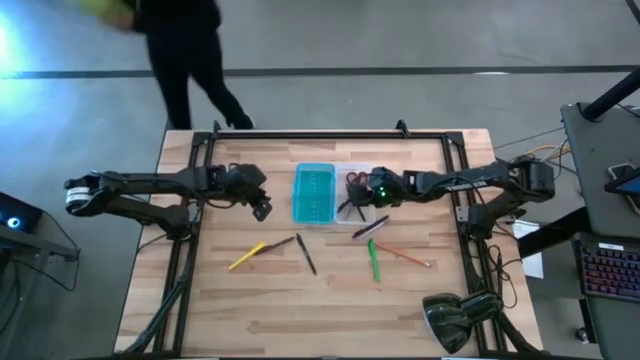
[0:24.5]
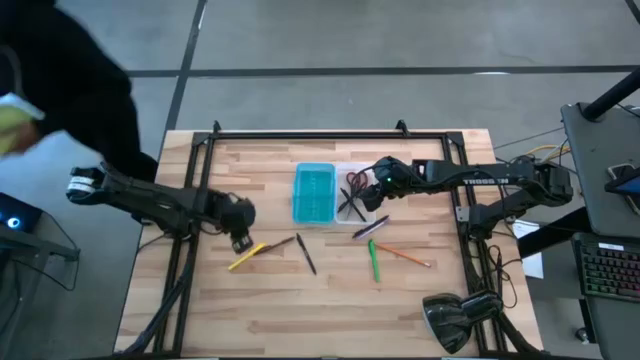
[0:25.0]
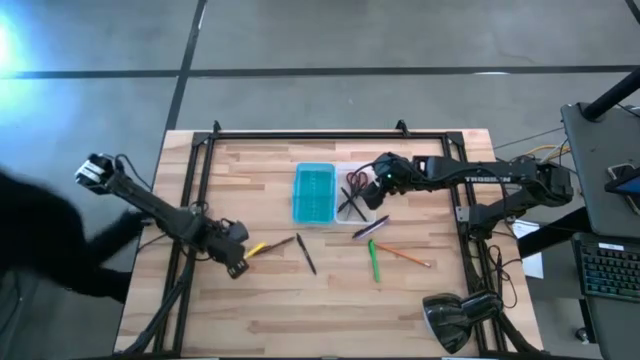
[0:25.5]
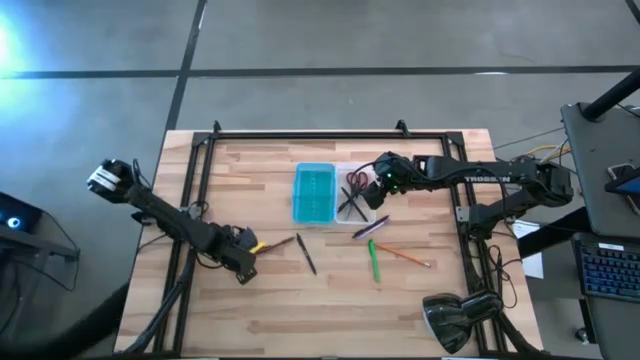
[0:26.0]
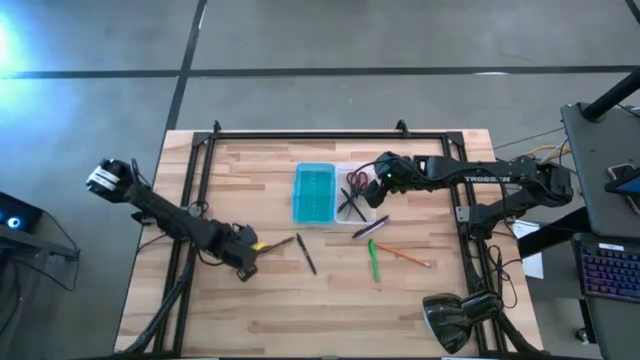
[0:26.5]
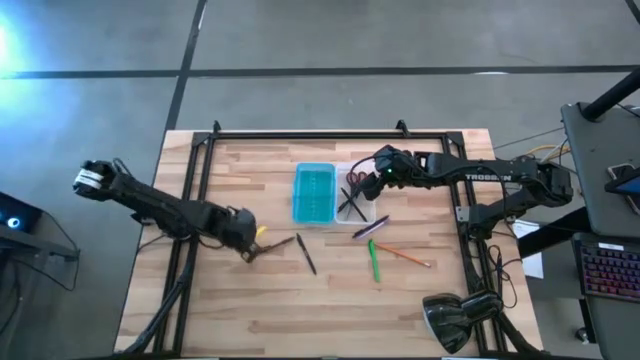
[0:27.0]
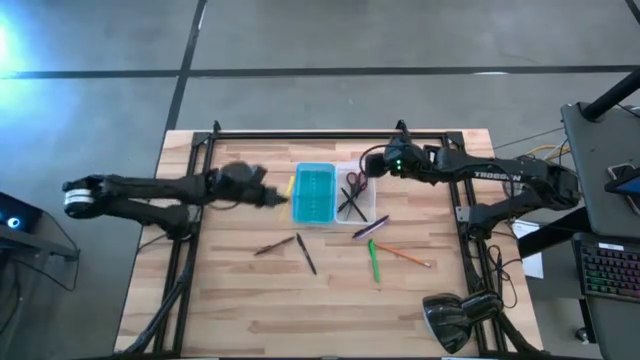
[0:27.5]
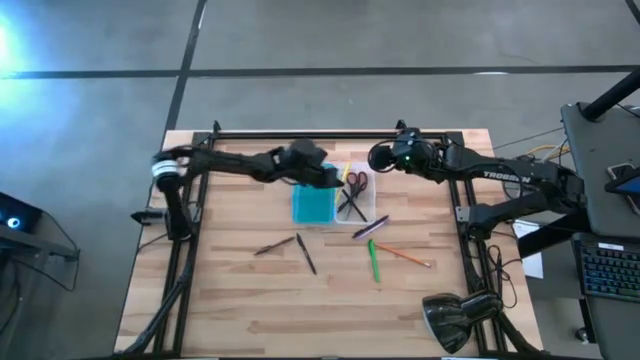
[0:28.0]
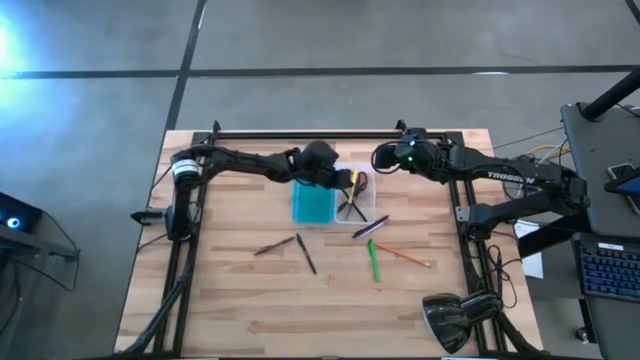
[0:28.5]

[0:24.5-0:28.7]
Task: Pick & place school supplies into a supply box
Put the yellow pen into the supply box

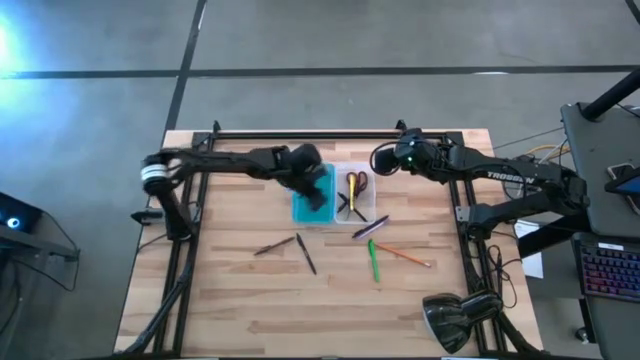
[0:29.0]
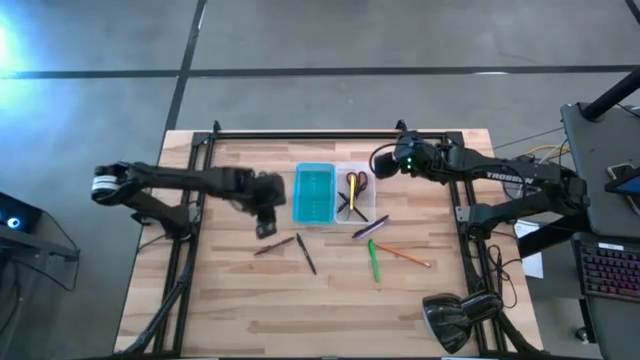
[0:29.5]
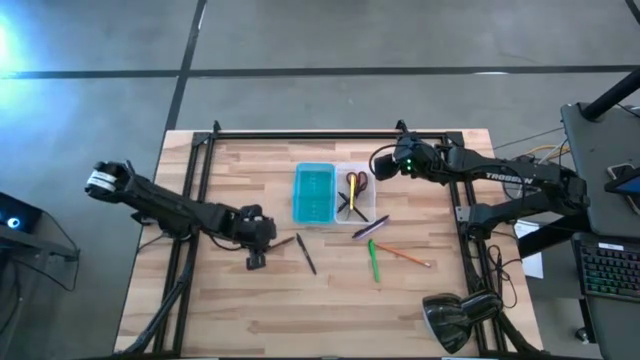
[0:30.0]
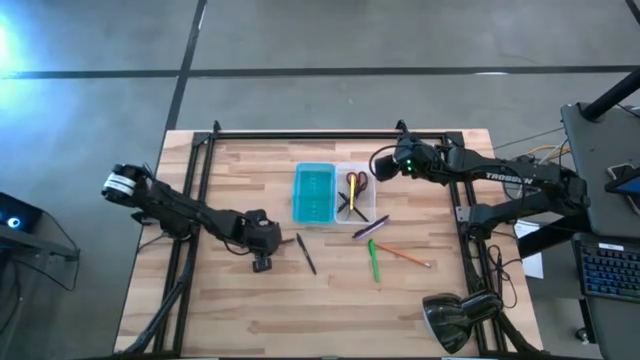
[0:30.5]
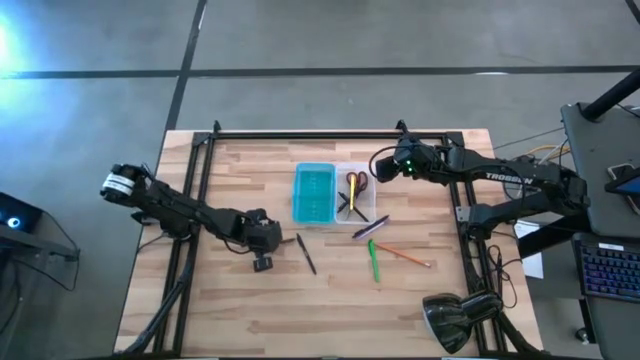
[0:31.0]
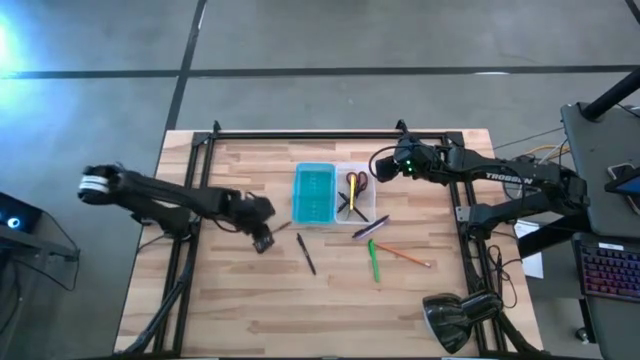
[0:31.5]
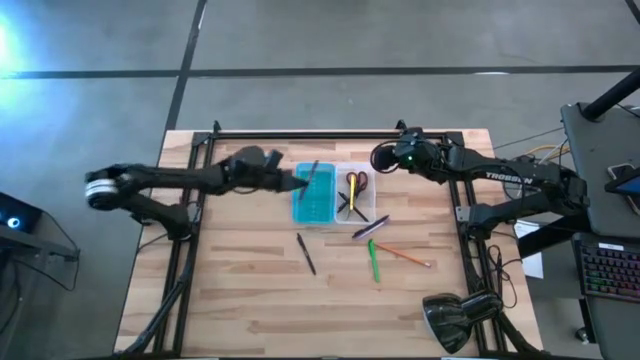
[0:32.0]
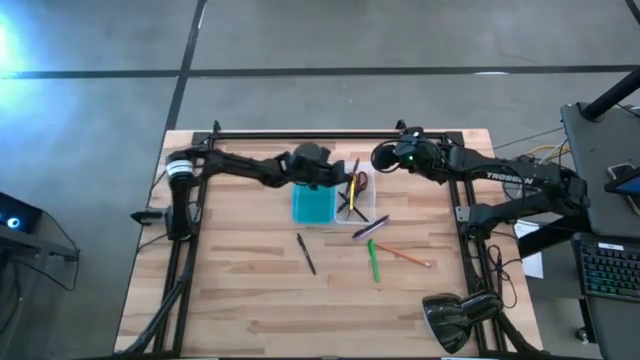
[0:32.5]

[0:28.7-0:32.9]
Put the brown pen into the supply box

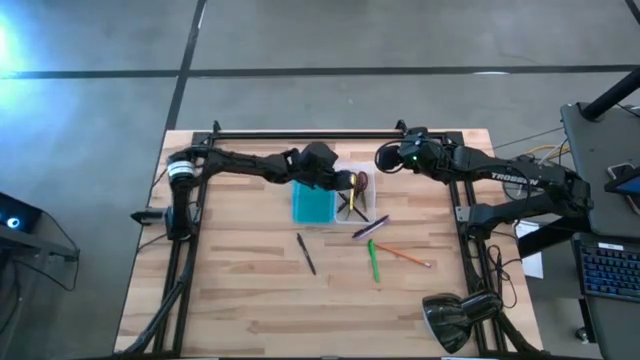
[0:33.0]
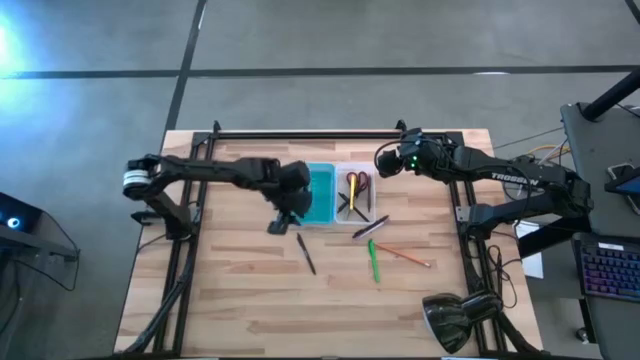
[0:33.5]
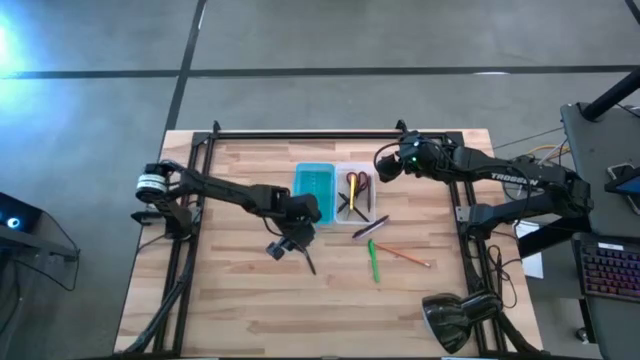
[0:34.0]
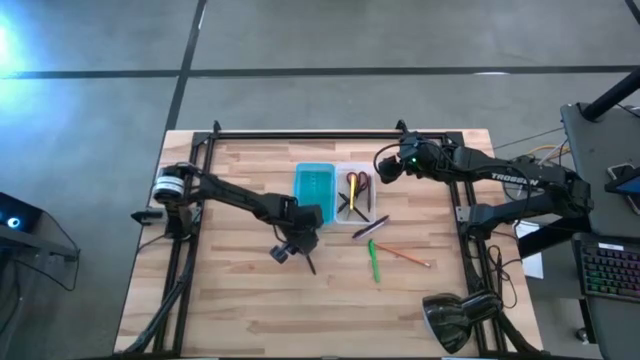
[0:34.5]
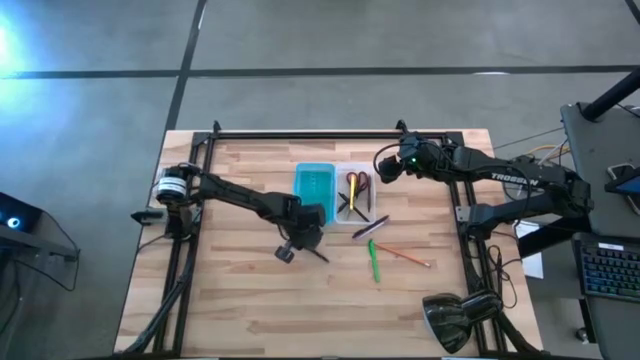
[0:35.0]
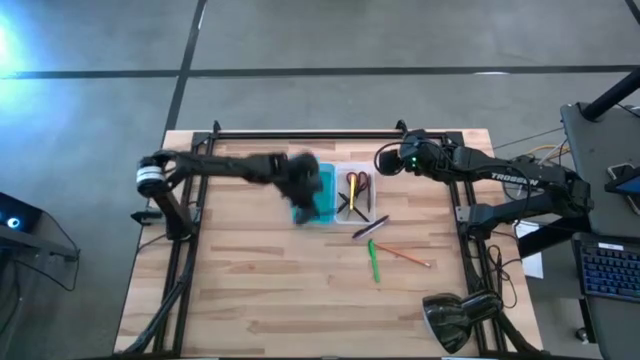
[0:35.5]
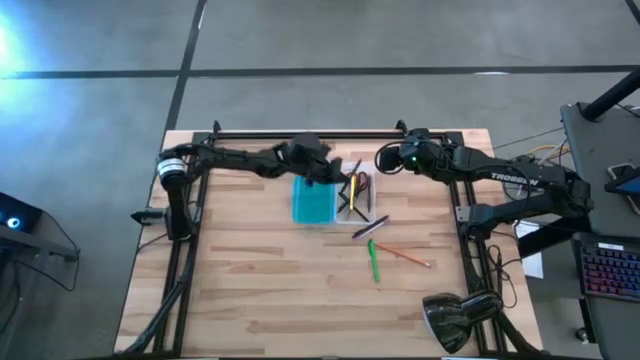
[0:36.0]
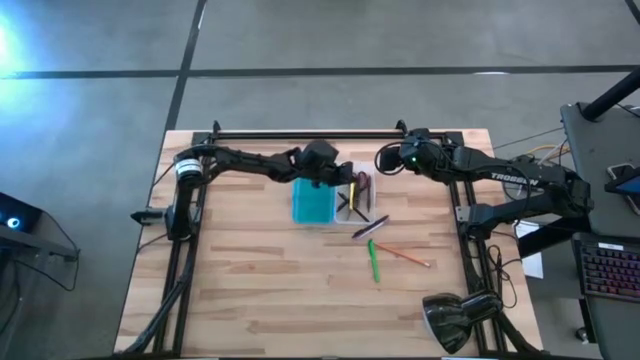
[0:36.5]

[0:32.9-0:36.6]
Put the black pen into the supply box

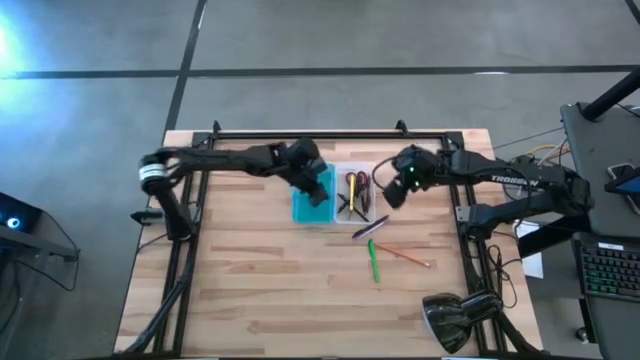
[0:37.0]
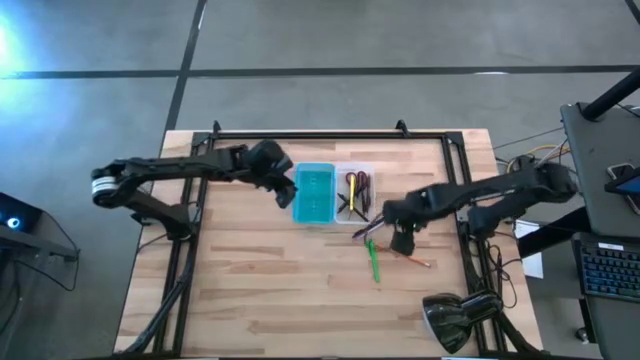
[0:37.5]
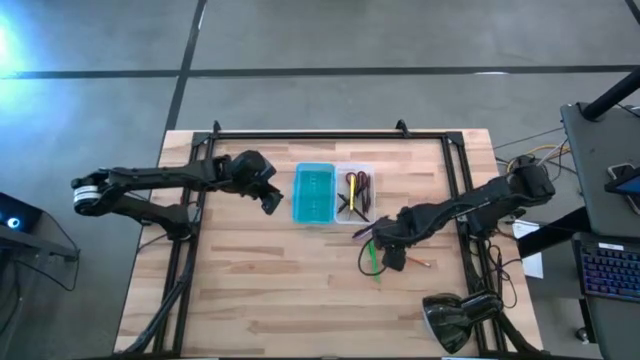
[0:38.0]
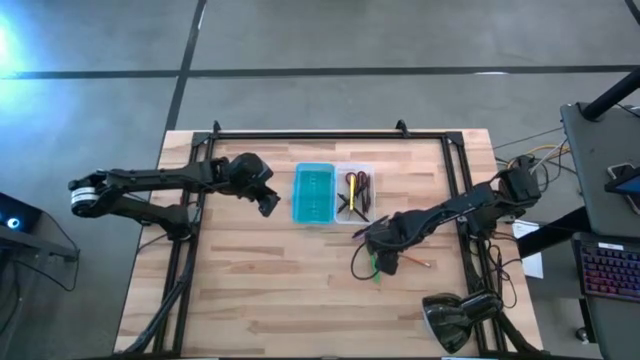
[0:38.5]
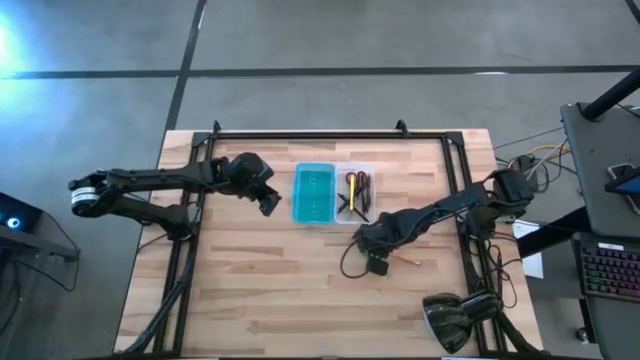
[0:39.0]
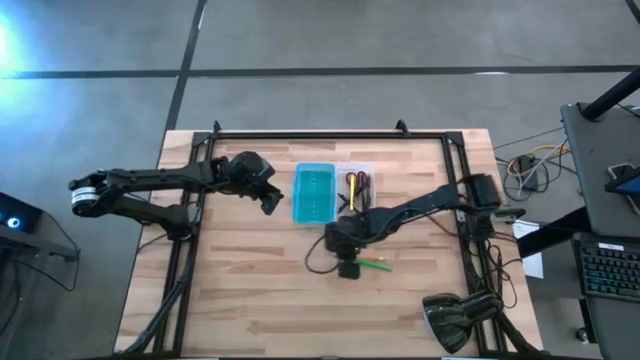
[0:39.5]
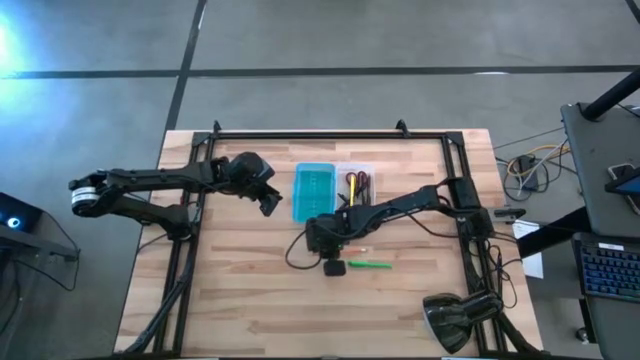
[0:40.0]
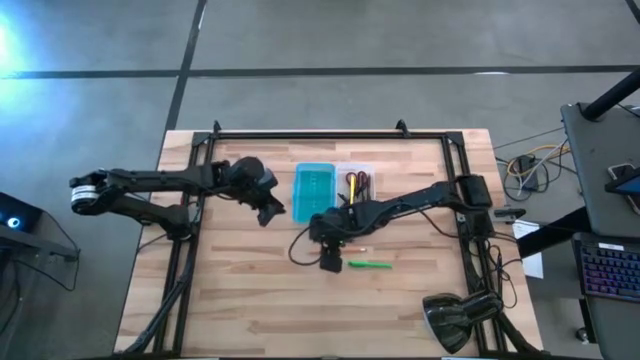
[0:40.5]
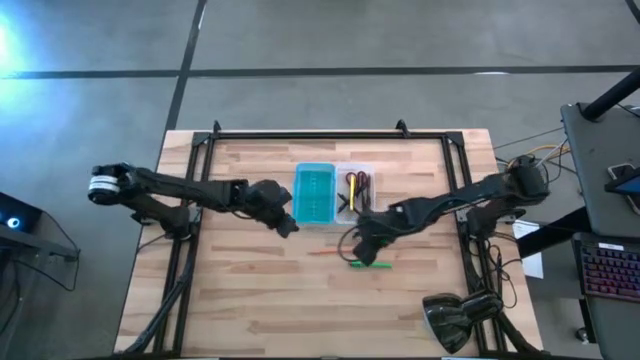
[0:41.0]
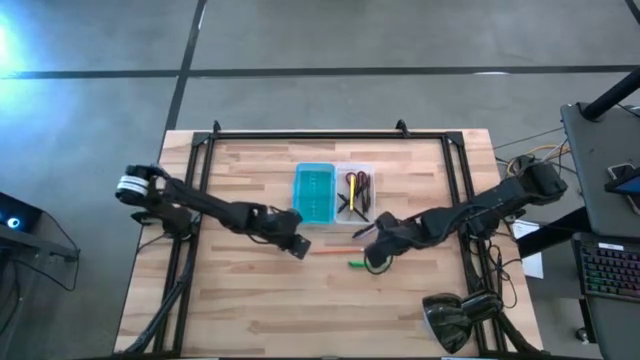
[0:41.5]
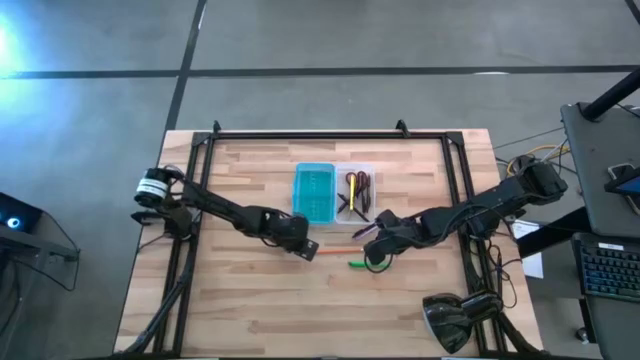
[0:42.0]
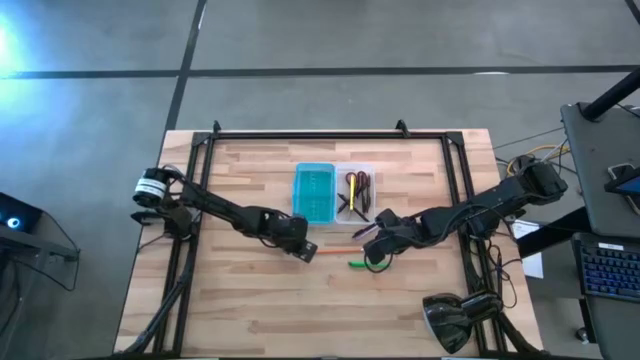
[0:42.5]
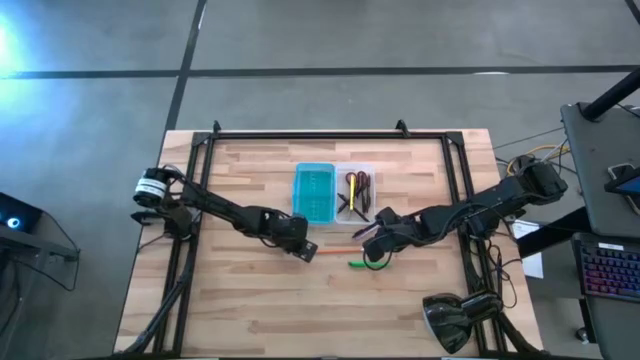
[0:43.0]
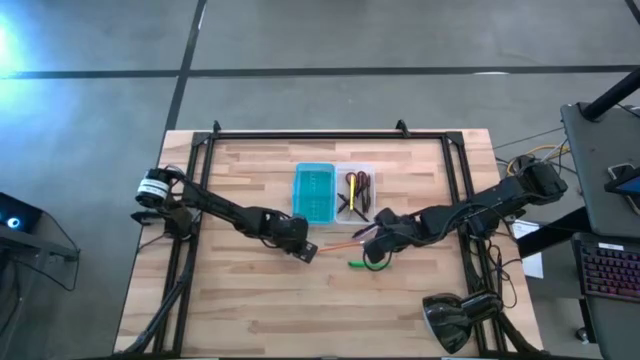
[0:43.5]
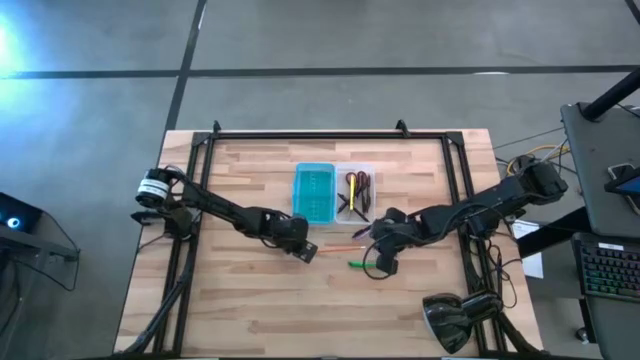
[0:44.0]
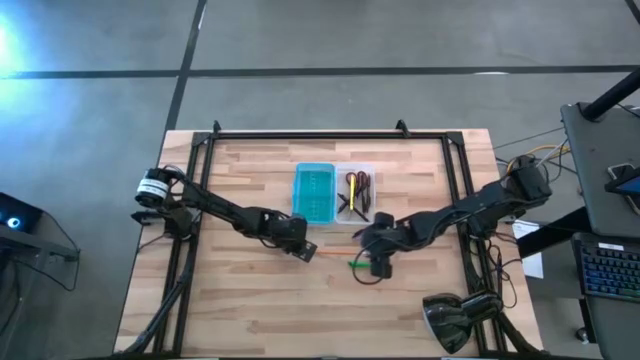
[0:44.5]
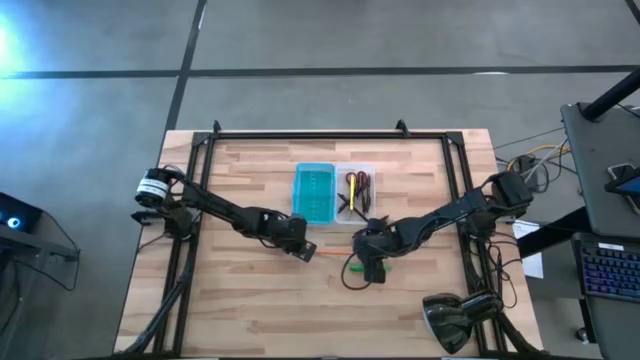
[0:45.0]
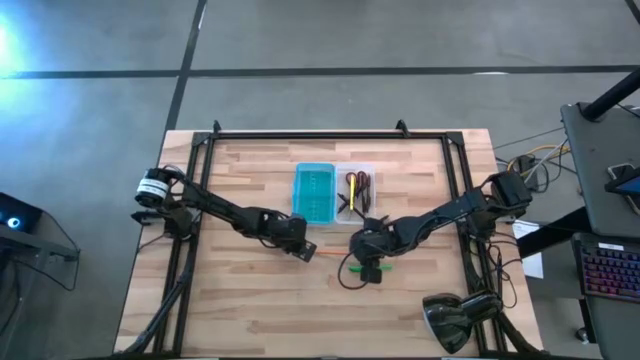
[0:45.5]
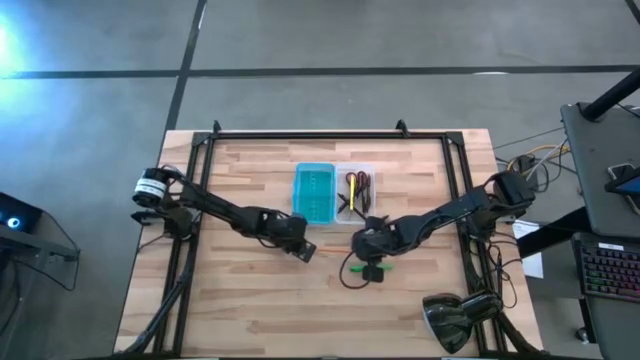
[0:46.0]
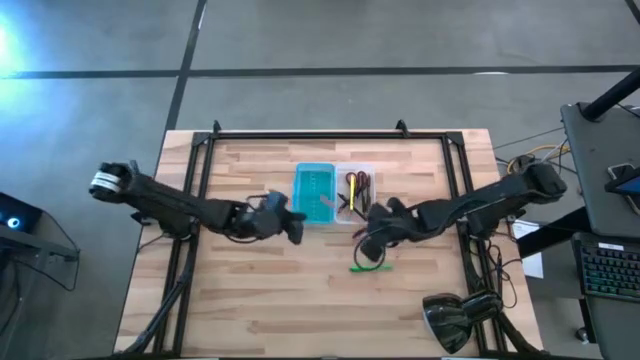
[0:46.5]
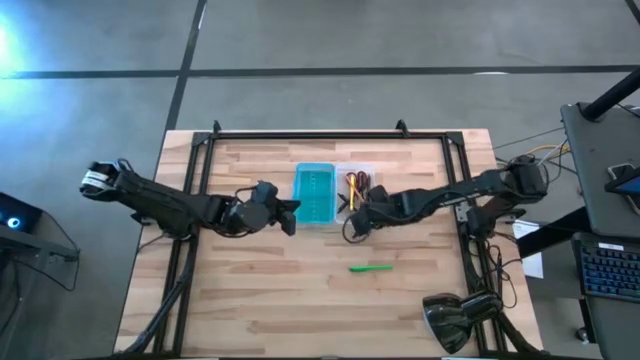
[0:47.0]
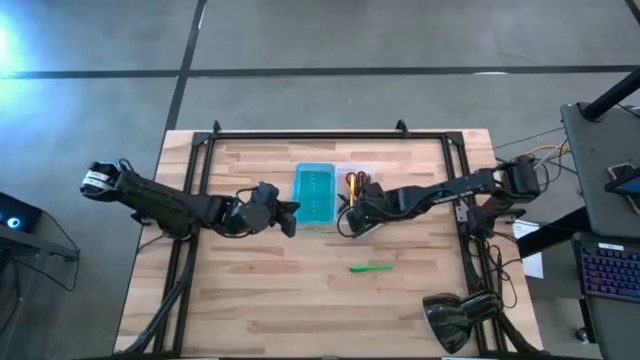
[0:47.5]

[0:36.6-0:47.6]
Put the orange pencil into the supply box
